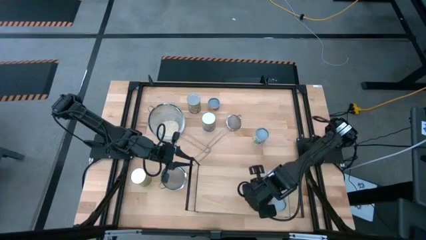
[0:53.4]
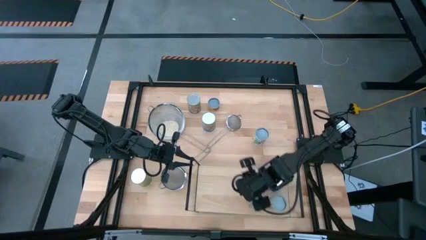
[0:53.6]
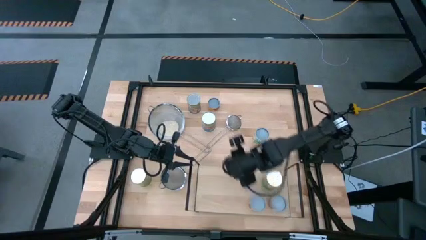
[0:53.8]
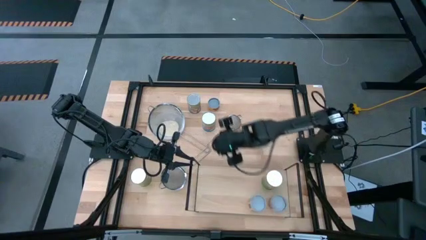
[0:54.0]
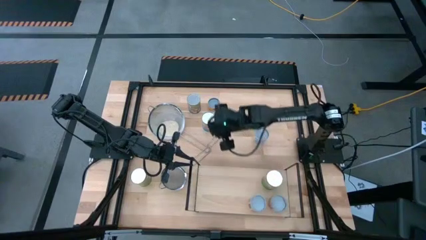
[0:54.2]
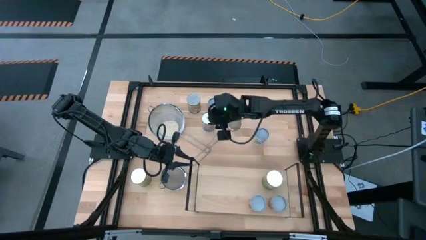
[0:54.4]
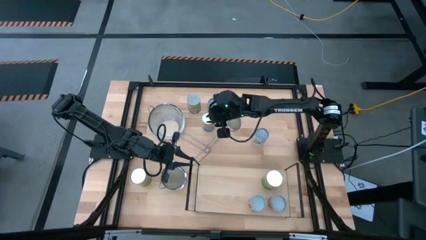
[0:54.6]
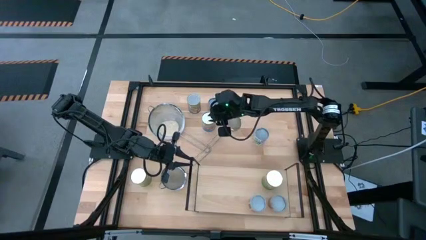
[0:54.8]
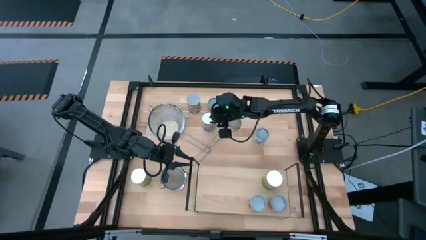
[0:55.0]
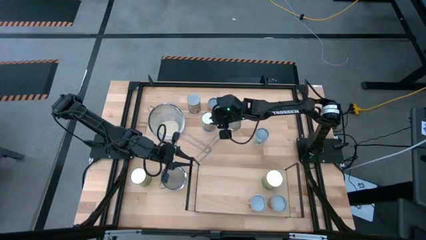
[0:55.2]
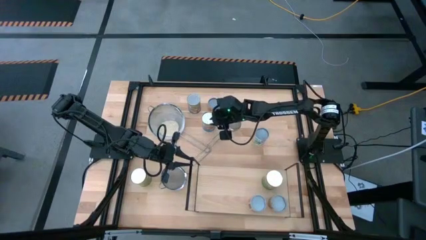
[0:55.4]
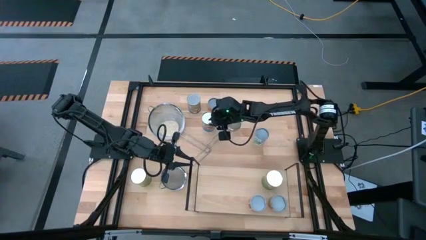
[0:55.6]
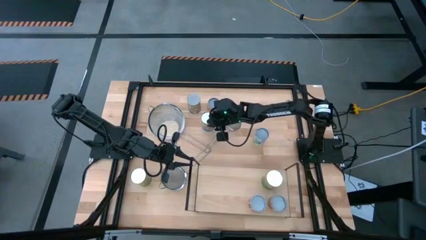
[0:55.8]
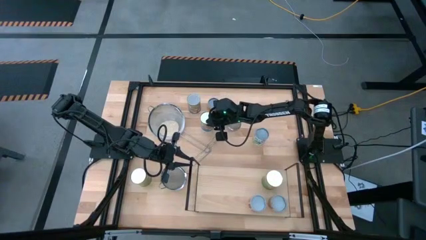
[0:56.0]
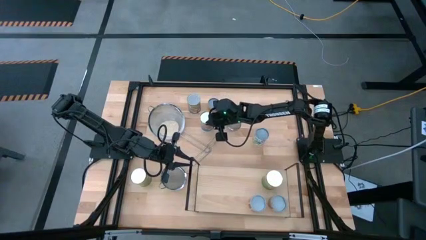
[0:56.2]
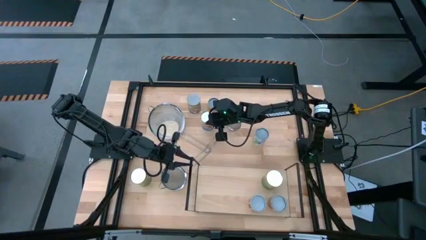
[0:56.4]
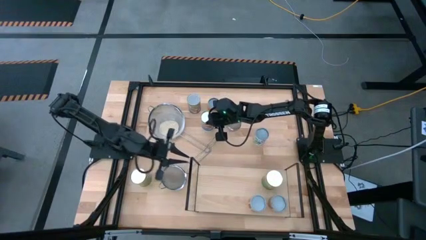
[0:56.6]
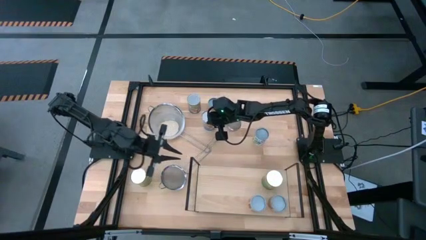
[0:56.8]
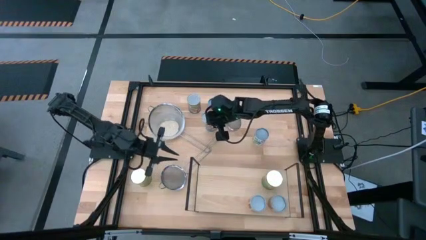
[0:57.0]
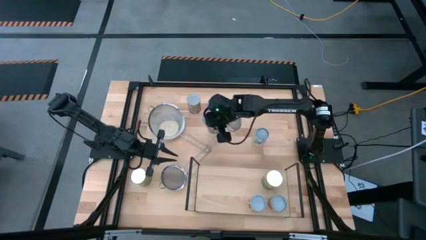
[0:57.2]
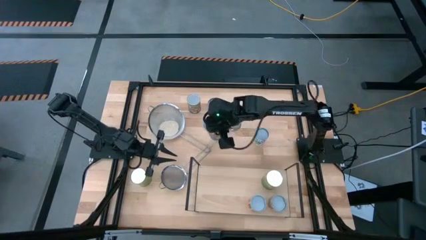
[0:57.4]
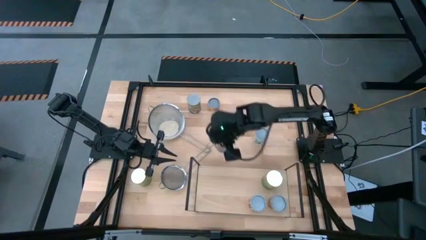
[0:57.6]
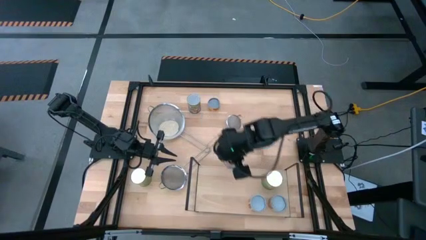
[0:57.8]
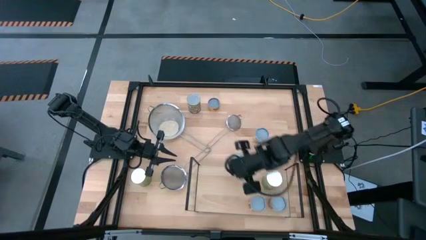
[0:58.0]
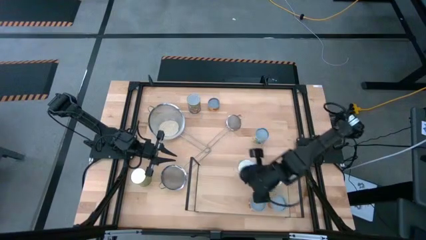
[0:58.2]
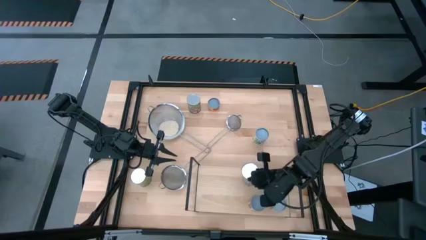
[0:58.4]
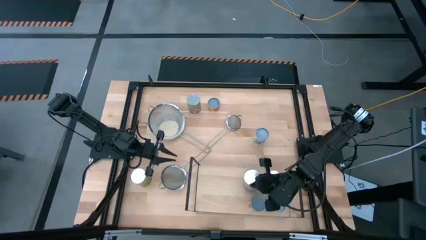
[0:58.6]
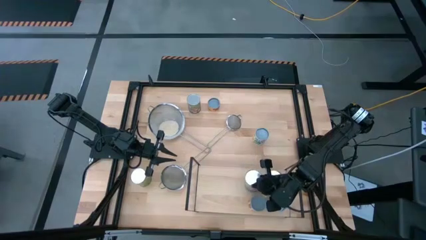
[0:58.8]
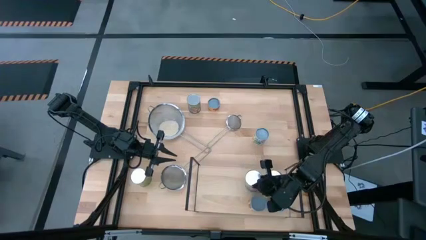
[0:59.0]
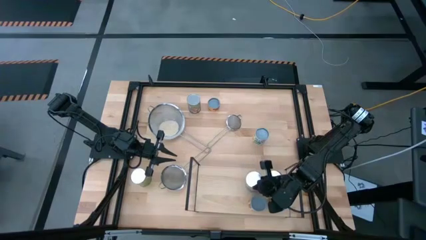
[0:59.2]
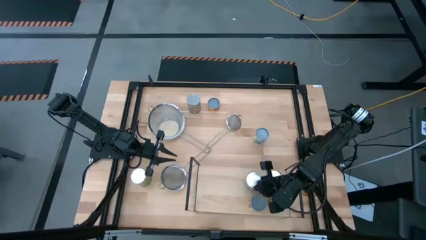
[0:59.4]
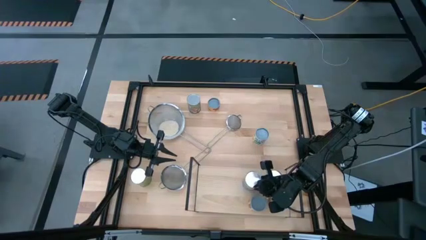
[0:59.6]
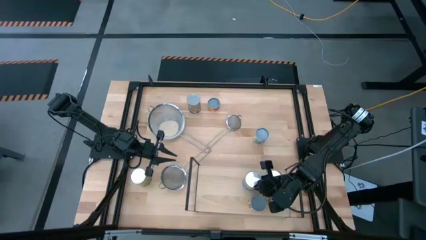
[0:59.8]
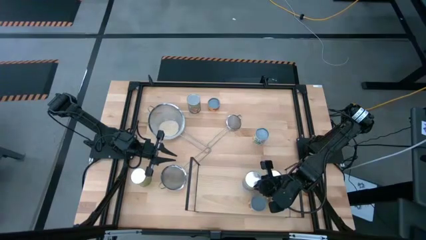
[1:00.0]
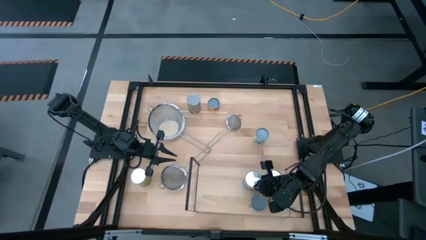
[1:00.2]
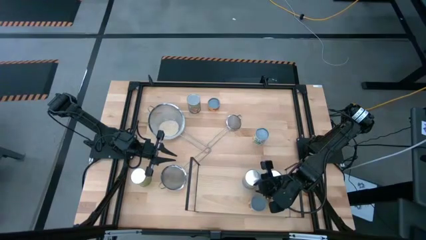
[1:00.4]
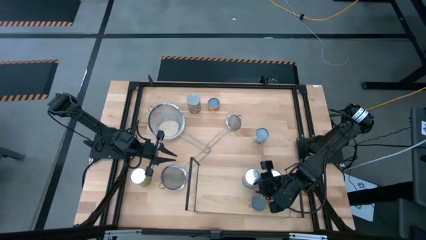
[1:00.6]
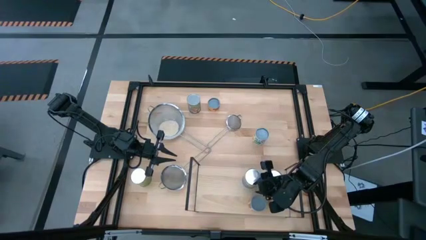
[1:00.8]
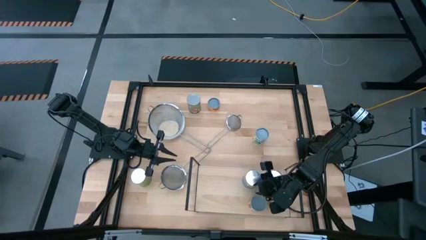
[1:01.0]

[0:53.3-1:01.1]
Task: Pick and place cans onto a shelf
Put the canned tomatoes on the shelf

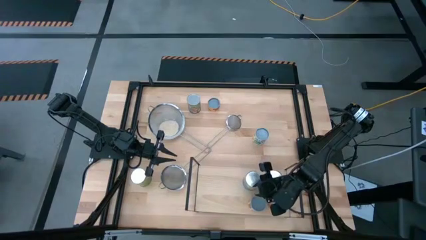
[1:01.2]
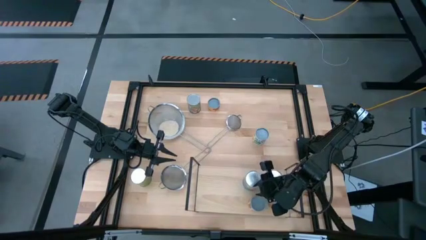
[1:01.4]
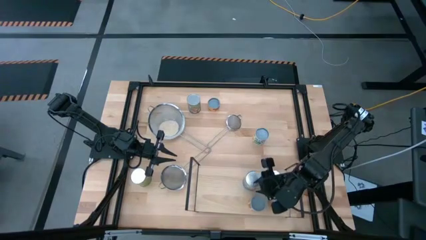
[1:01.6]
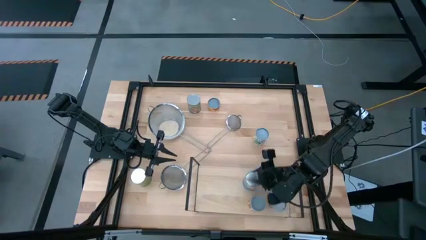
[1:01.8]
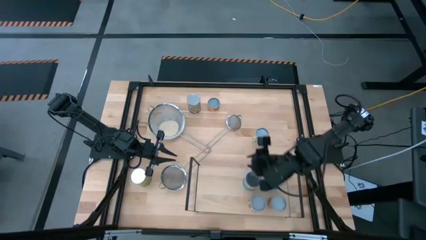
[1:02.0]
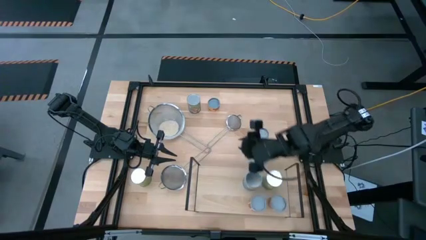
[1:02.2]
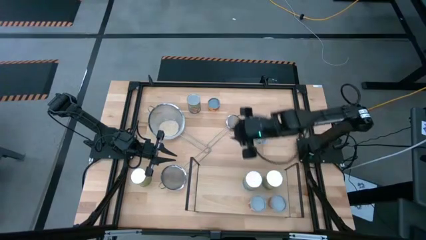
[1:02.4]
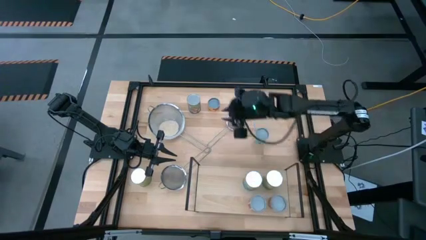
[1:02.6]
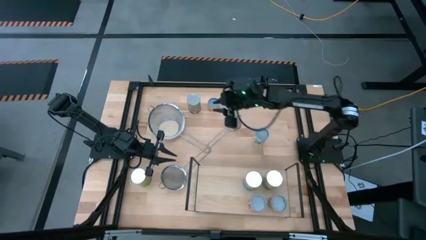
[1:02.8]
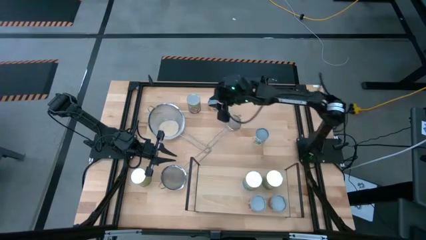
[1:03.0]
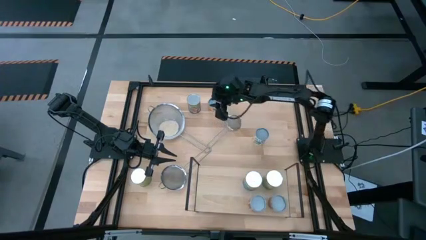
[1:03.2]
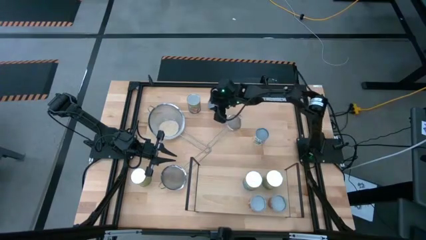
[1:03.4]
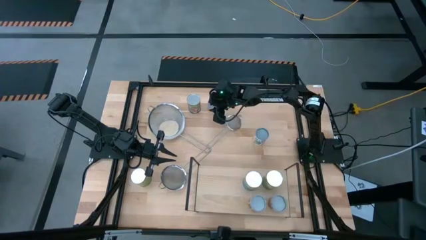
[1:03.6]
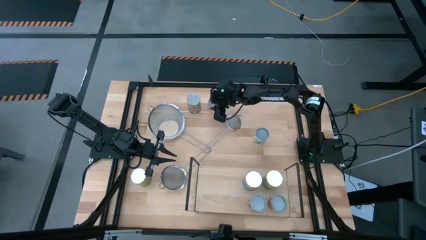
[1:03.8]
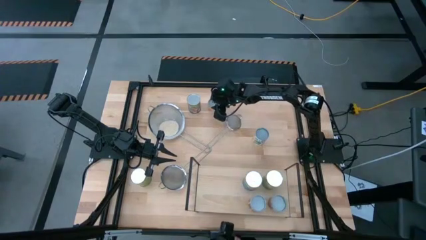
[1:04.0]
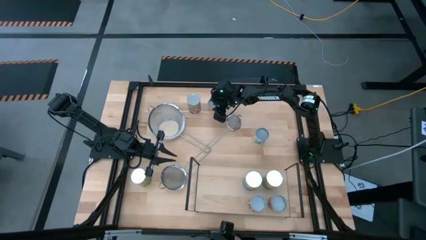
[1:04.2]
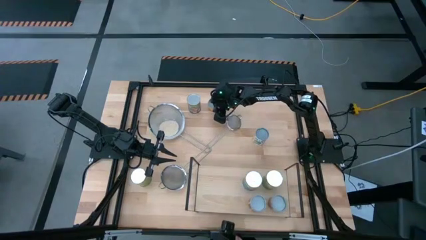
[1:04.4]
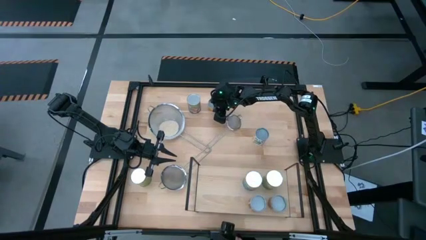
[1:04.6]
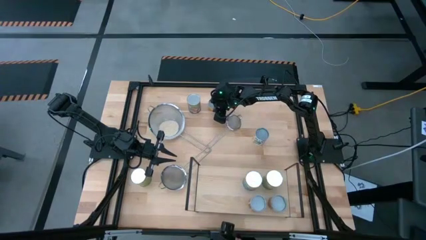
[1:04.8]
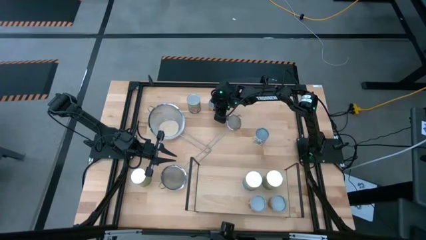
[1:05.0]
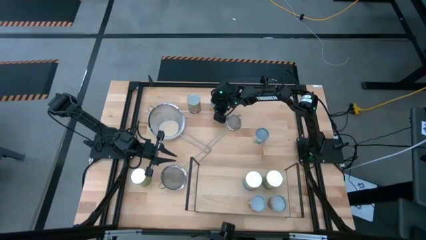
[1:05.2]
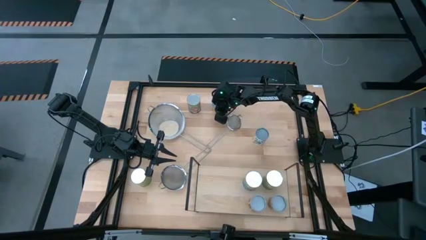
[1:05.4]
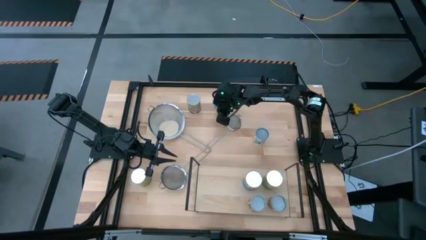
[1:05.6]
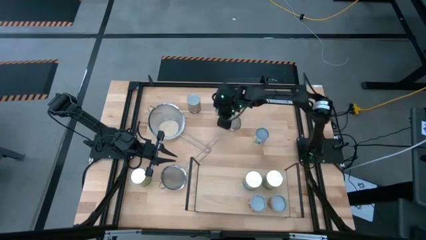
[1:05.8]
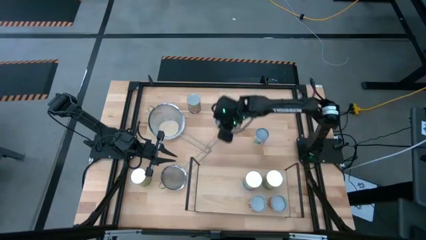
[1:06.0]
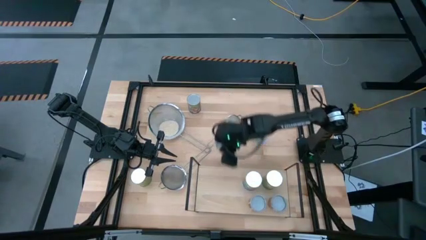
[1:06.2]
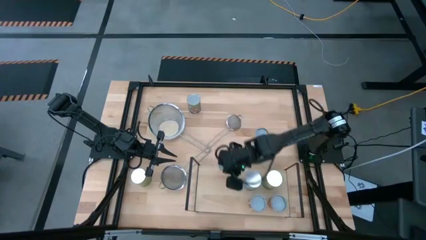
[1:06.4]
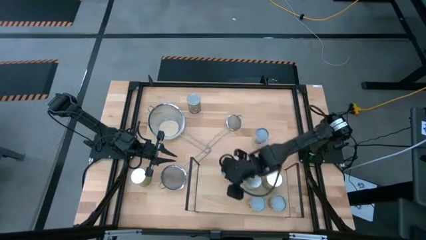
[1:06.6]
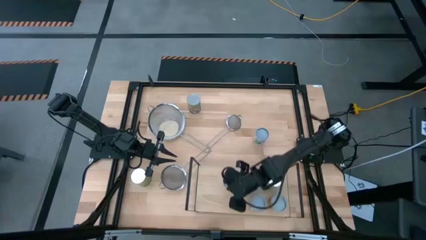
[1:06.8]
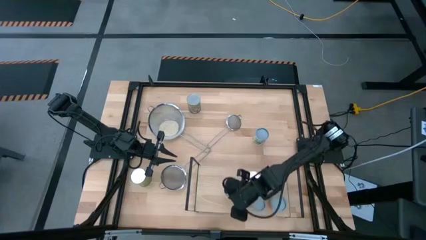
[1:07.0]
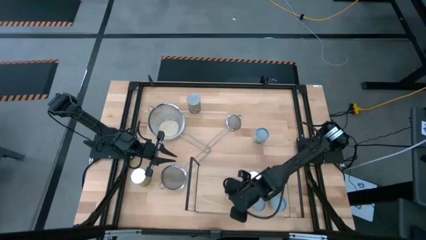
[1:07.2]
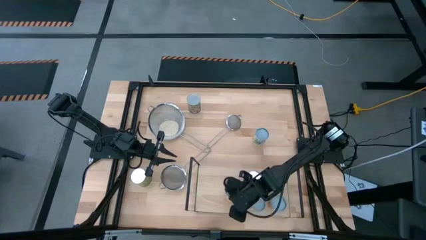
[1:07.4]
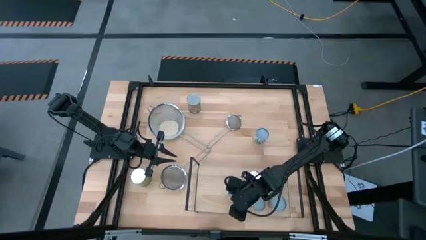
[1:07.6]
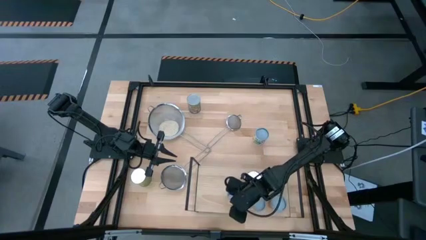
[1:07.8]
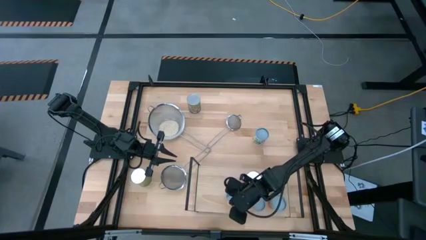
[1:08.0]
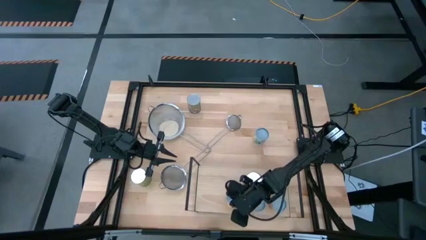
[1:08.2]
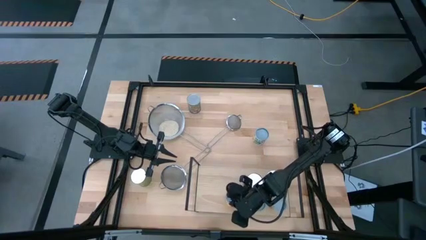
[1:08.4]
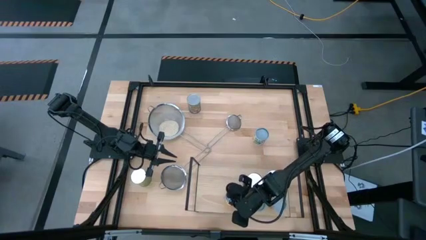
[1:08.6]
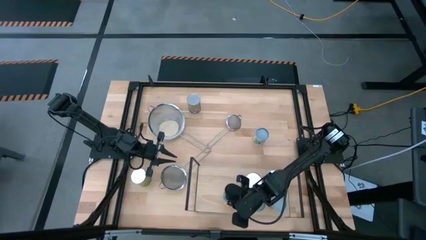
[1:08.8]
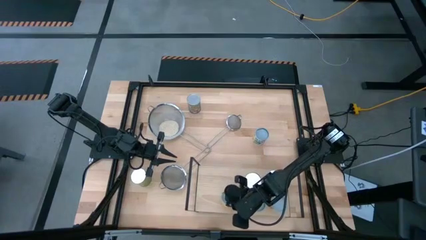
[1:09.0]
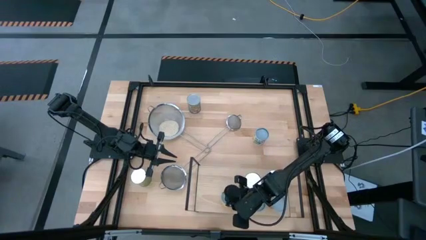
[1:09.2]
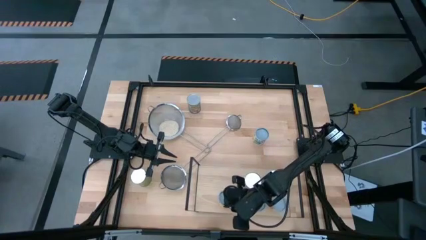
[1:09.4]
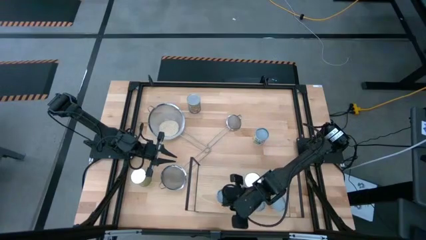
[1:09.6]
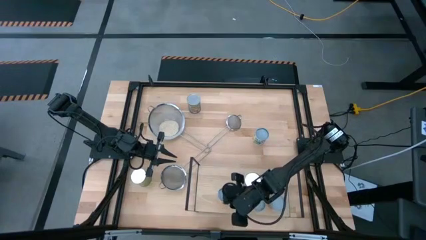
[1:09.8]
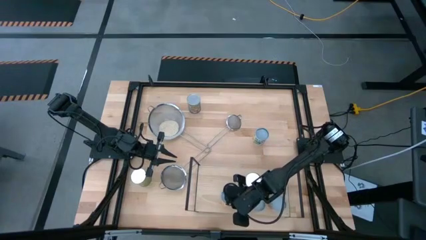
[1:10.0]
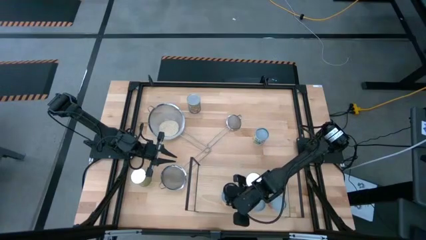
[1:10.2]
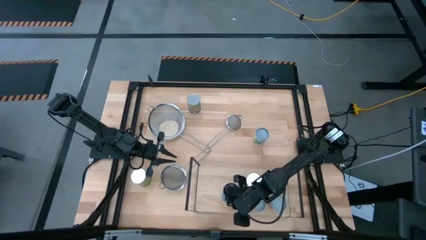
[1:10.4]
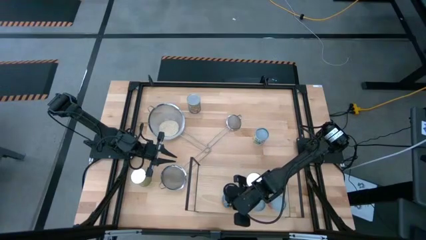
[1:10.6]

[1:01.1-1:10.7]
Put the canned pineapple rings on the shelf
